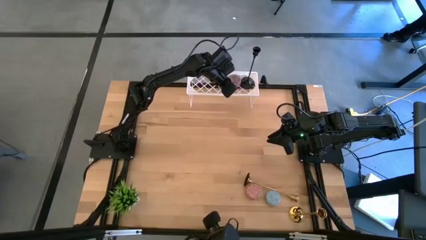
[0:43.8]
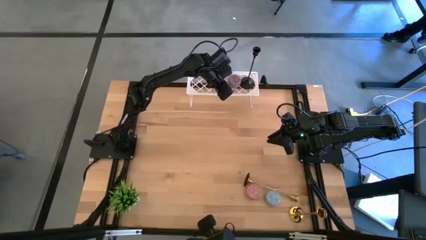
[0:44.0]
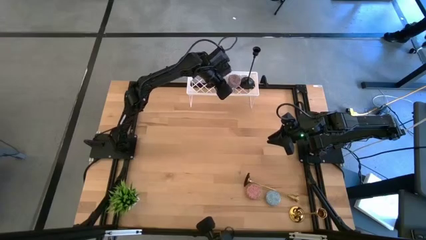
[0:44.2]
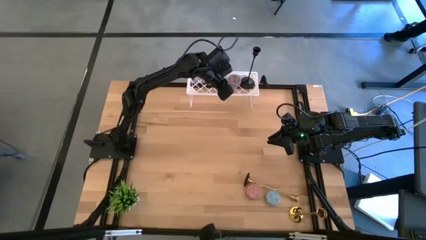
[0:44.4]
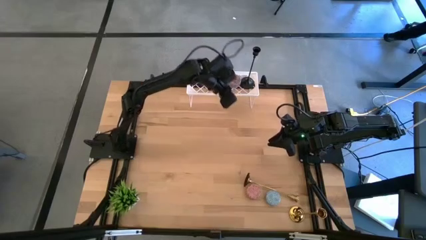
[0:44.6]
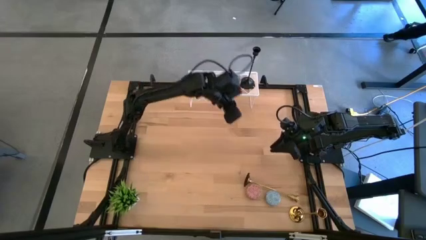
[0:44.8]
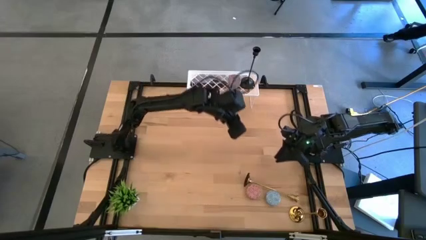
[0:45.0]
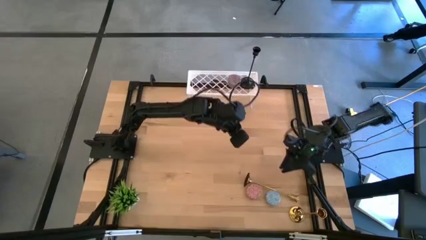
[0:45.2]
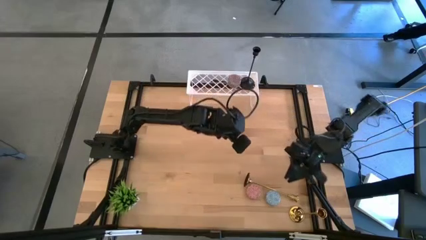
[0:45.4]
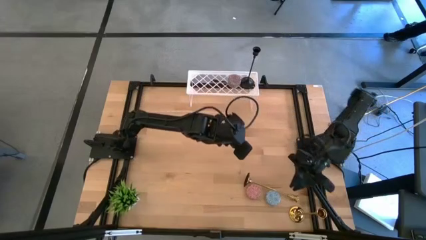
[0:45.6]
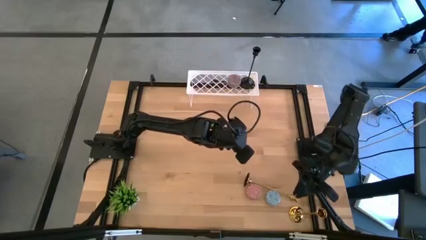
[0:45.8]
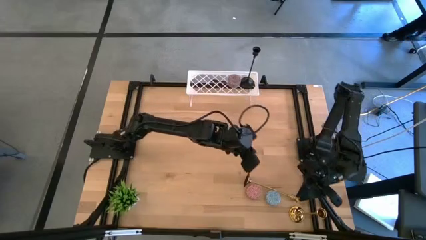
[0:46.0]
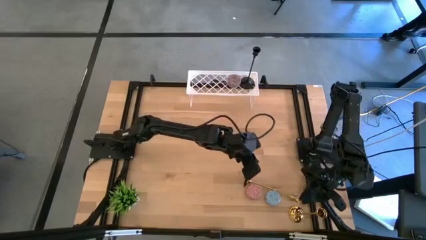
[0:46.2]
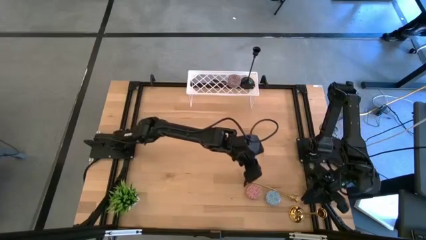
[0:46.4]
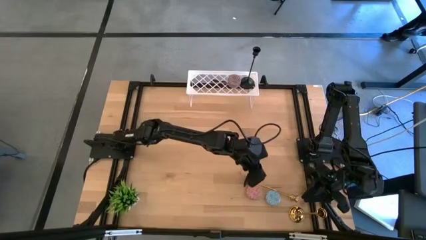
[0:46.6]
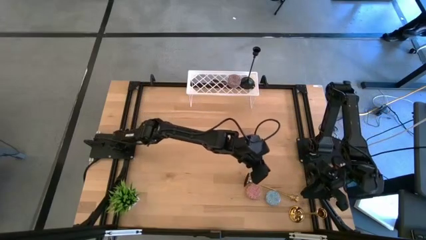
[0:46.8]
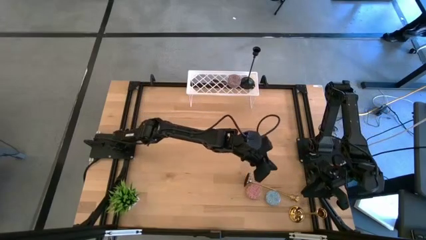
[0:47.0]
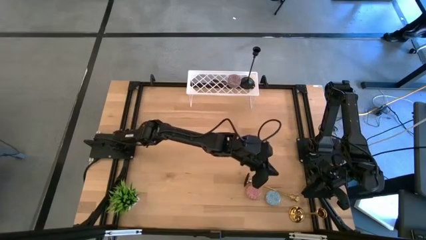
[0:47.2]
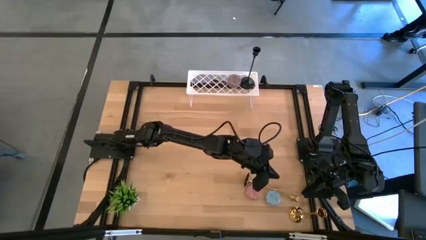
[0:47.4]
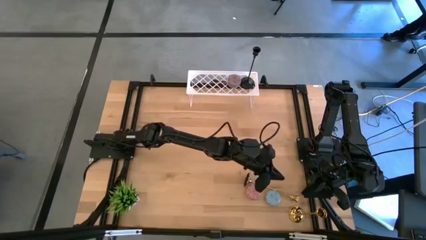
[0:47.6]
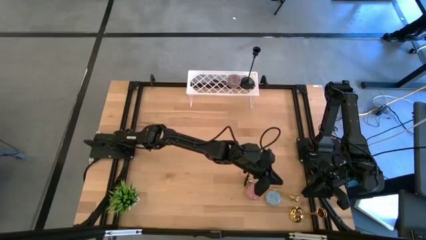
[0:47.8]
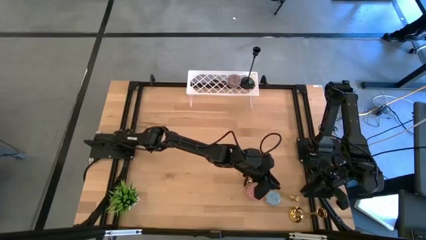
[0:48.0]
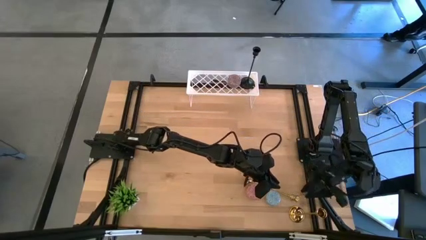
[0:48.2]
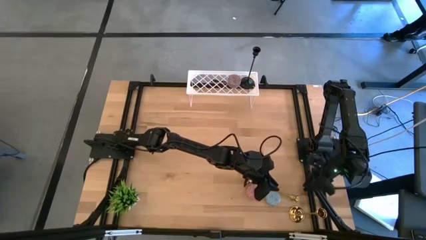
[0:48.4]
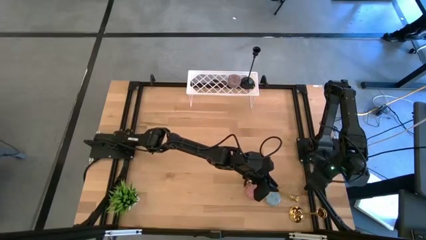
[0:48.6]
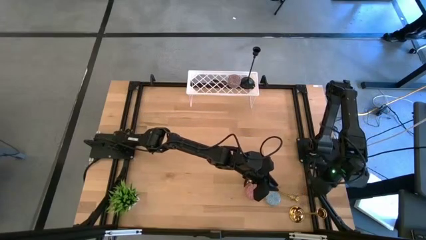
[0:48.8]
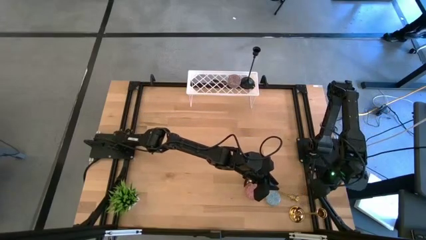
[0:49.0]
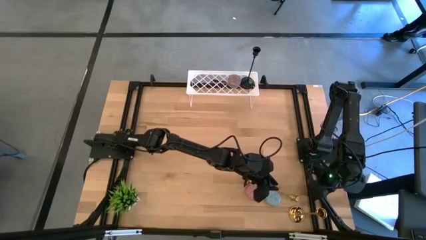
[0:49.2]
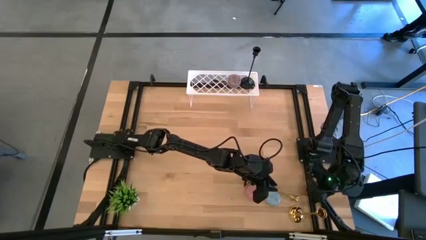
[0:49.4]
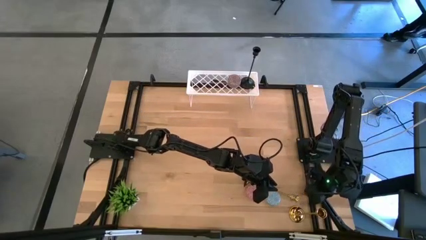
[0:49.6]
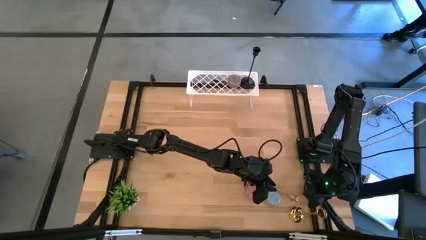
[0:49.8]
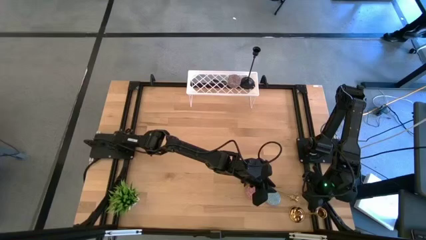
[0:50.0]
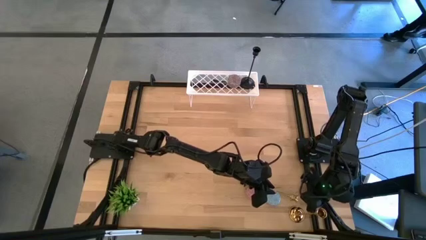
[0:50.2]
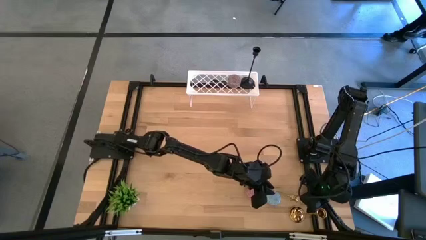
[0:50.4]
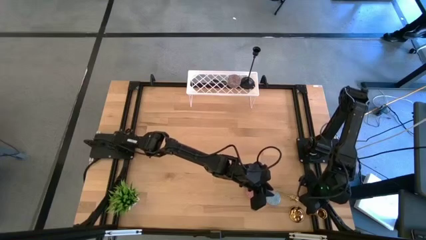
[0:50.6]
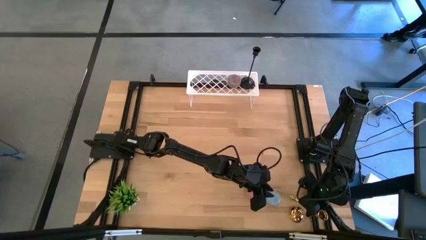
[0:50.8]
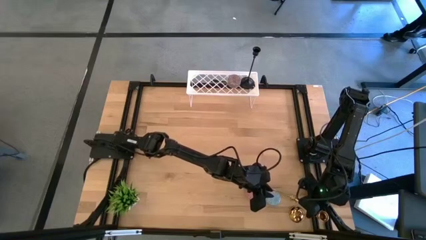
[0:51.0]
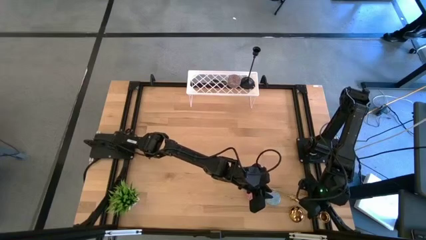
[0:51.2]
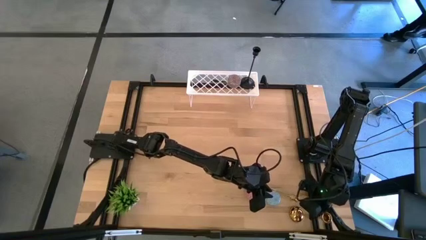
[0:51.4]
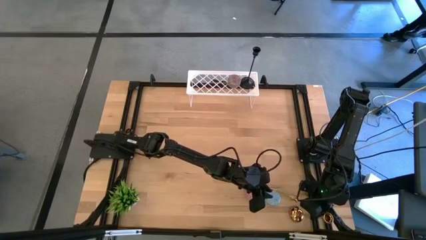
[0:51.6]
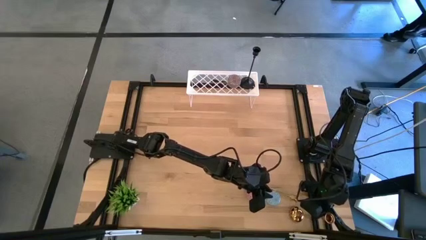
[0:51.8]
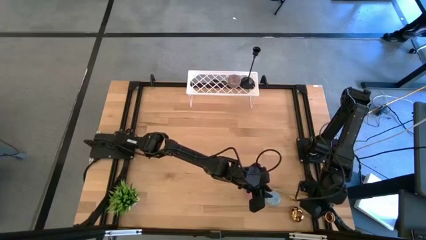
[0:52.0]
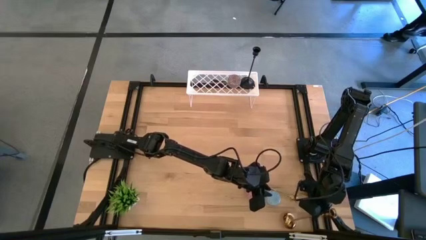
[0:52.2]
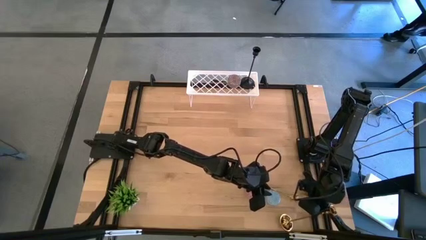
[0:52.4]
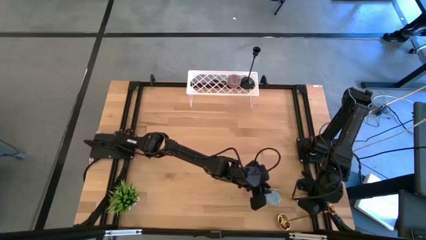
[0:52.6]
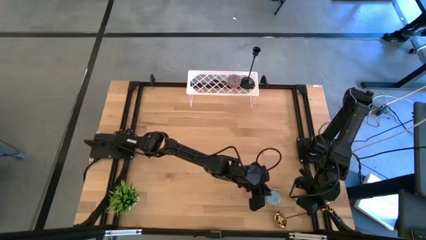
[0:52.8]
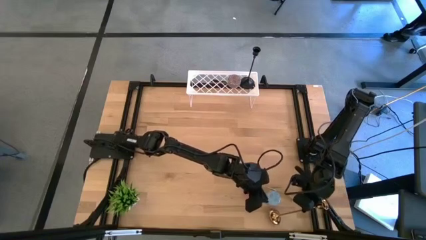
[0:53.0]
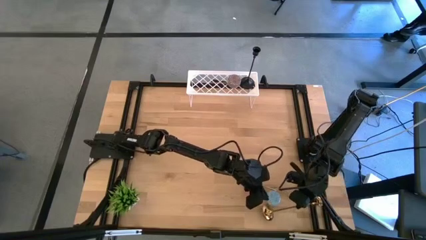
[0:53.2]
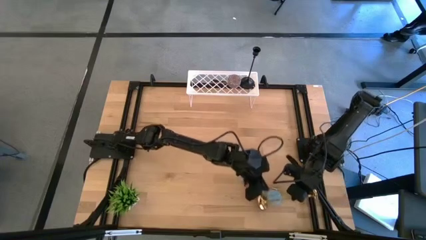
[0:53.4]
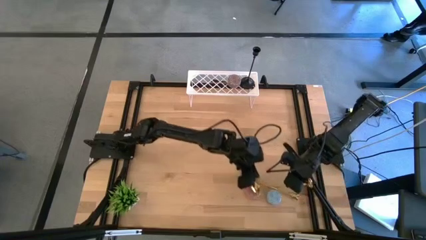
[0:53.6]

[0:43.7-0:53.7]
Task: Pick & Place candle stick holders
Put the right golden candle holder on the shelf
